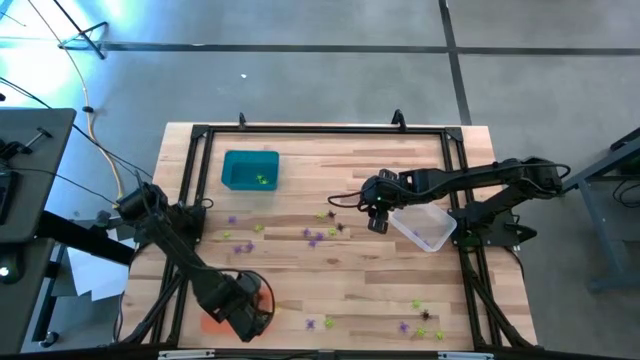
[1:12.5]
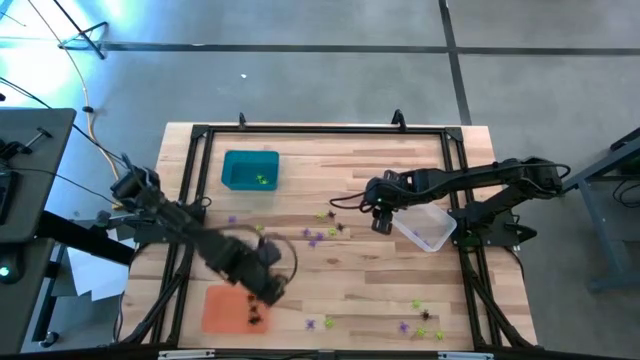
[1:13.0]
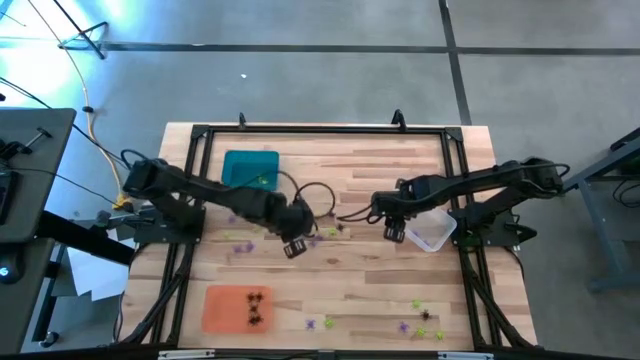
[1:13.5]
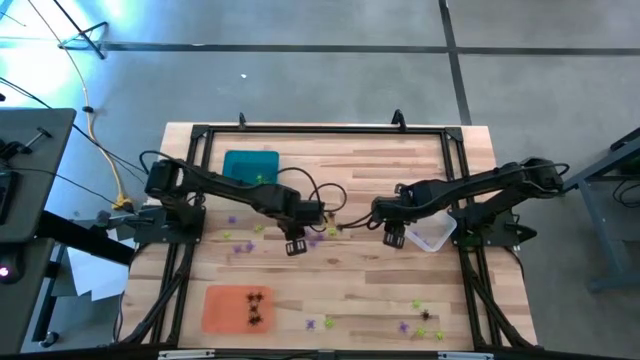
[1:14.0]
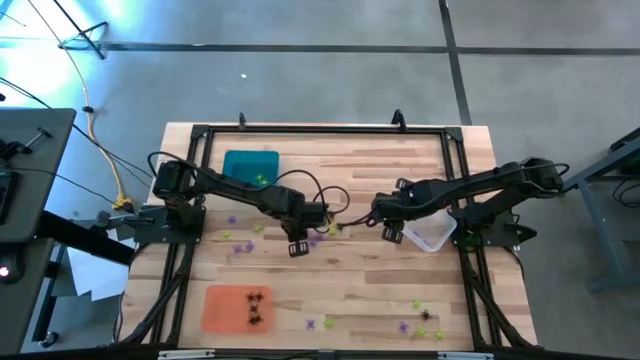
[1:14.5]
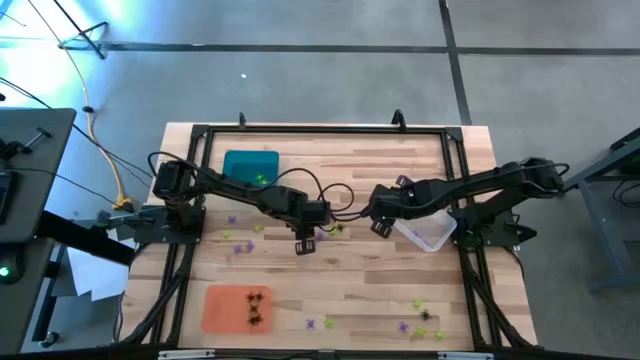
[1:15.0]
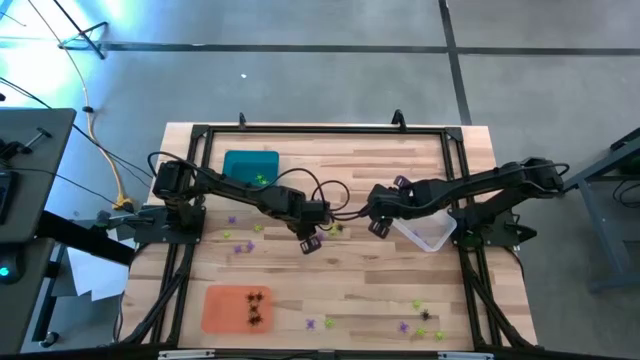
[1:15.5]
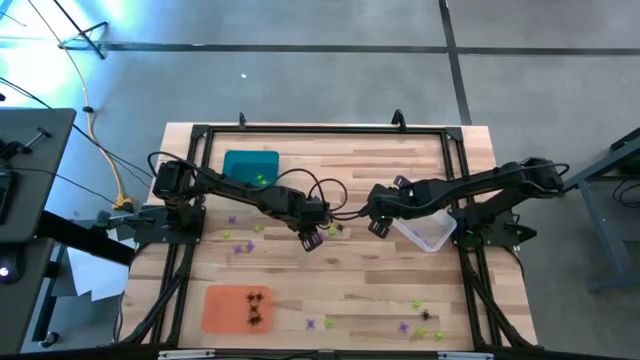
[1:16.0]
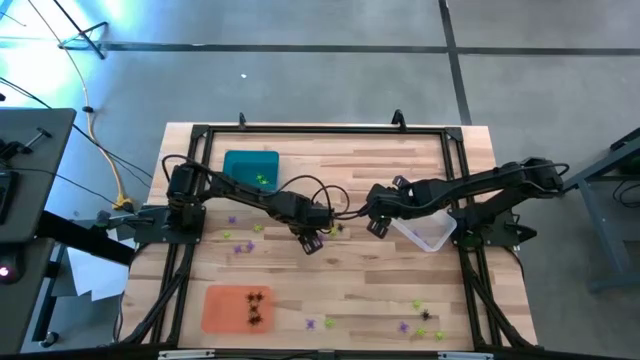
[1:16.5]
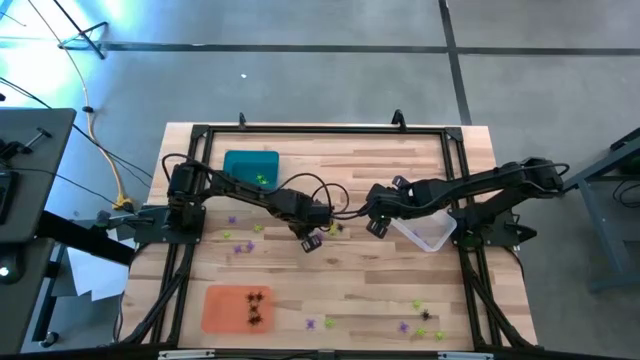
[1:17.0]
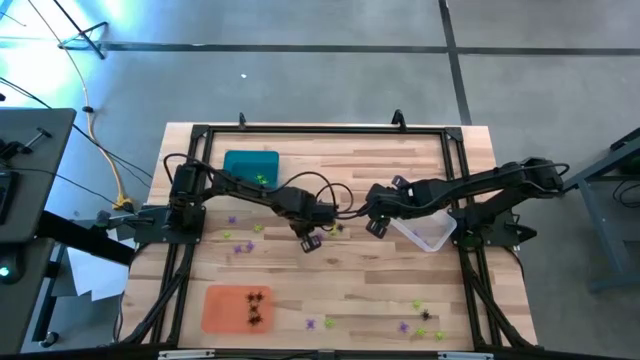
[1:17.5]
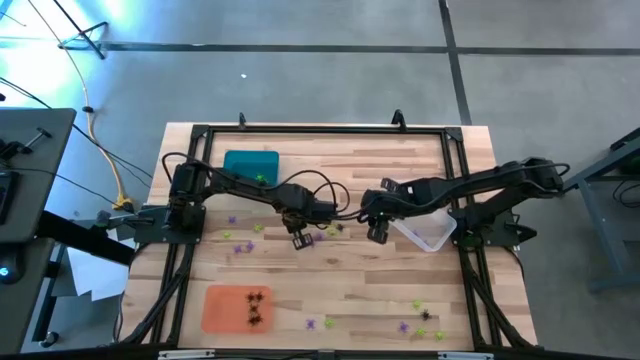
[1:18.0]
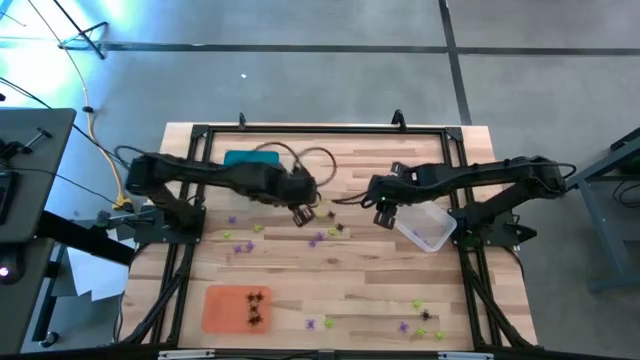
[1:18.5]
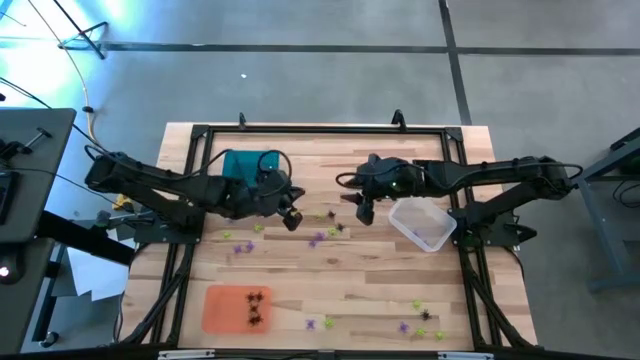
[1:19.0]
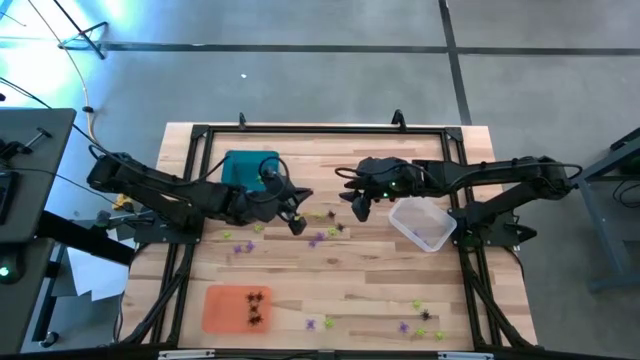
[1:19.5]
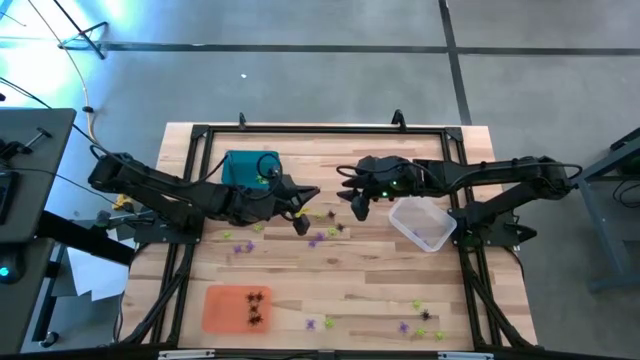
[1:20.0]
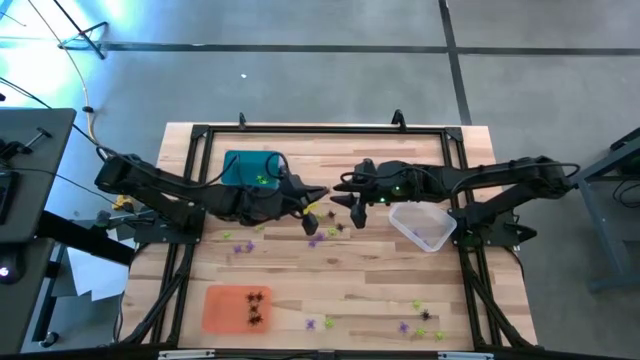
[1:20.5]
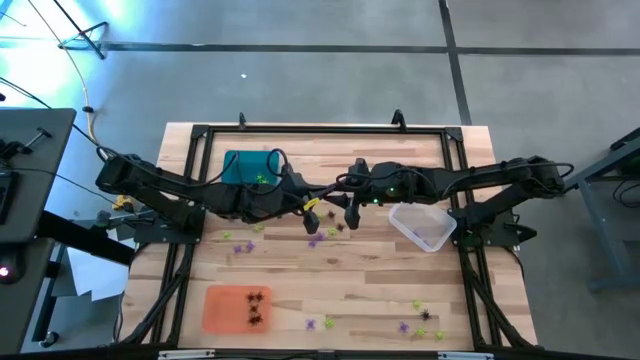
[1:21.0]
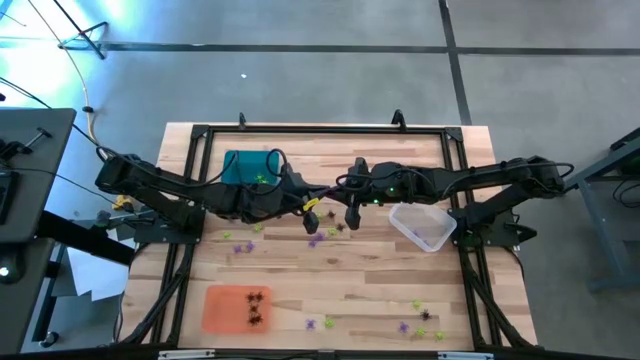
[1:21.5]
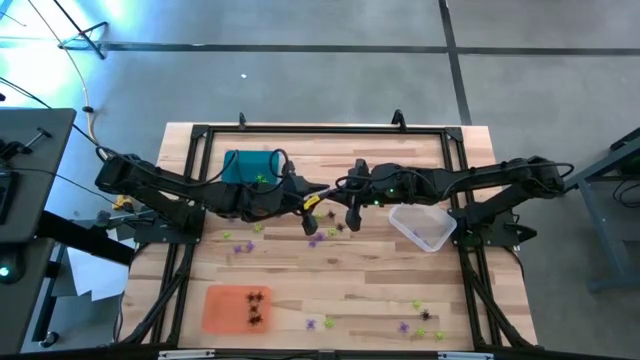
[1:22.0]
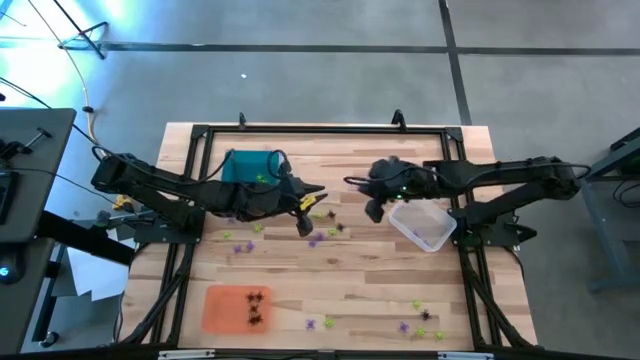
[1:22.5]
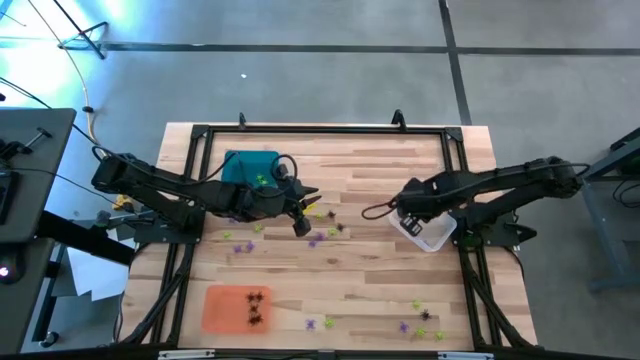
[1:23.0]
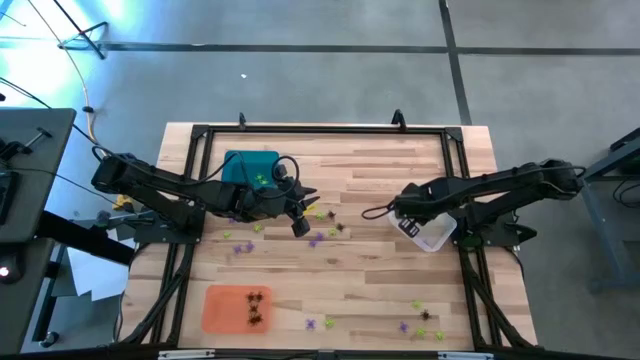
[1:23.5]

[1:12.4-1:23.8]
Task: Sort Halloween decoration
Put the violet spider toy into the transparent bin

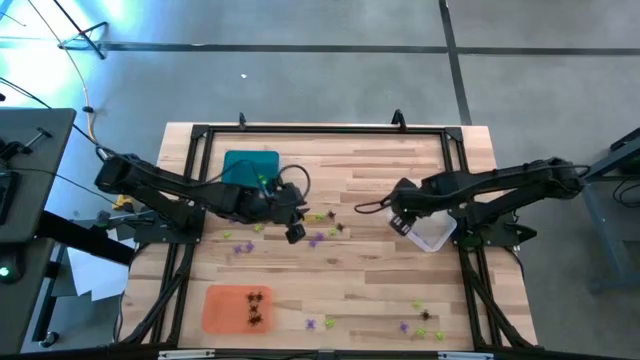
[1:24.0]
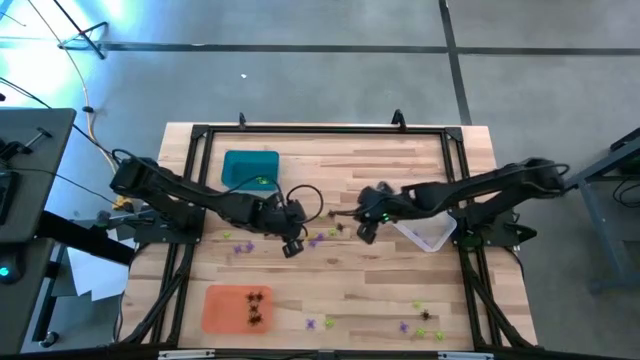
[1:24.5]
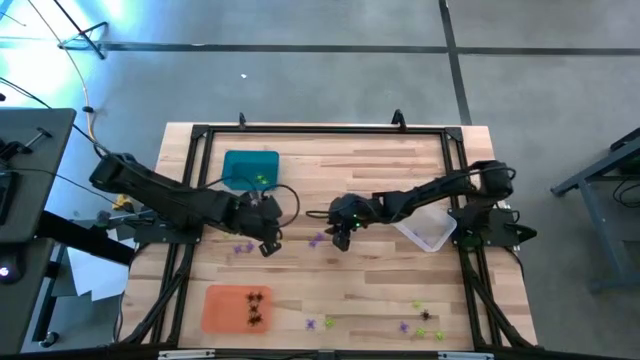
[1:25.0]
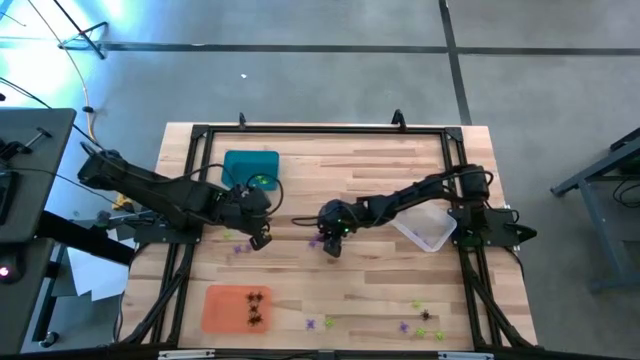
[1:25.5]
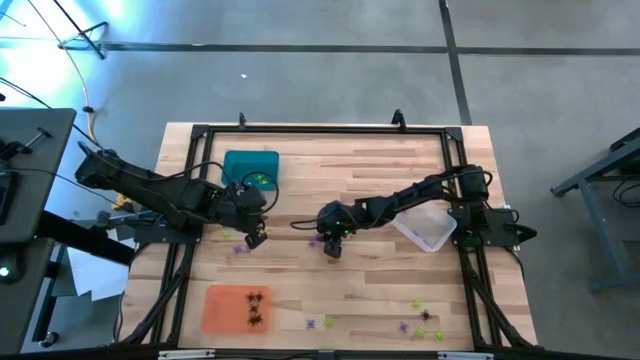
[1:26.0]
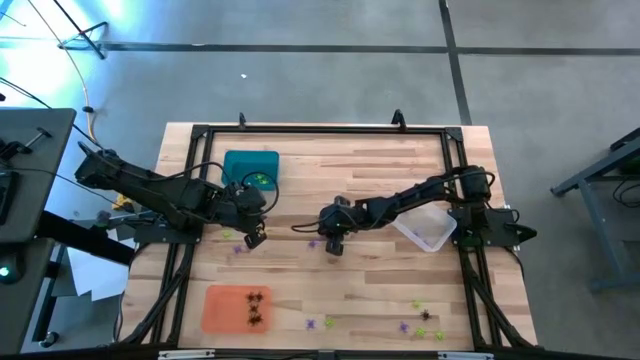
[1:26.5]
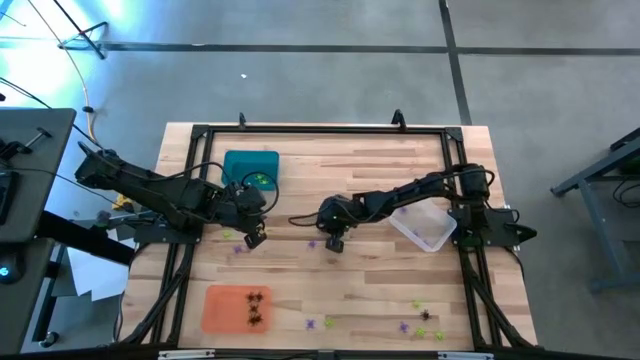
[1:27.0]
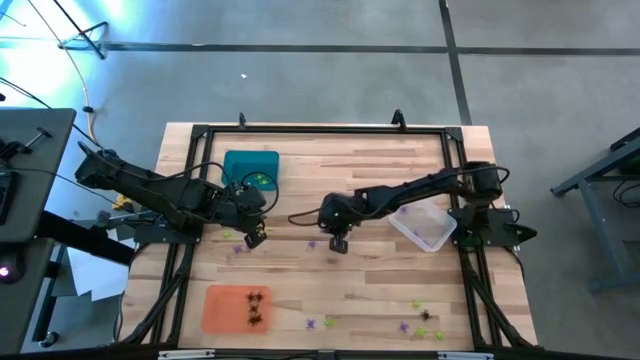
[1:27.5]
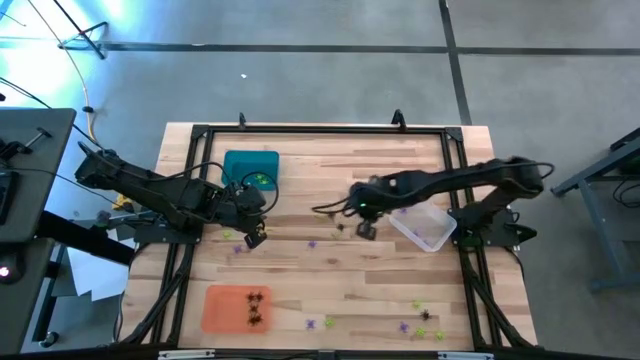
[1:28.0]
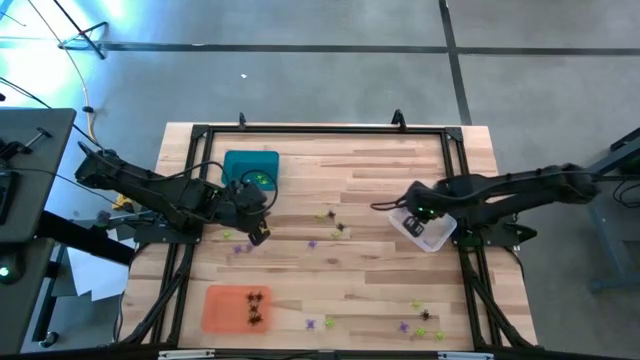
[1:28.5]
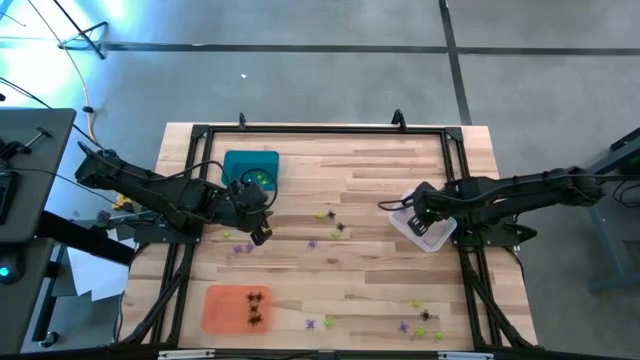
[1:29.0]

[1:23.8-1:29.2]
Put the violet spider toy into the transparent bin

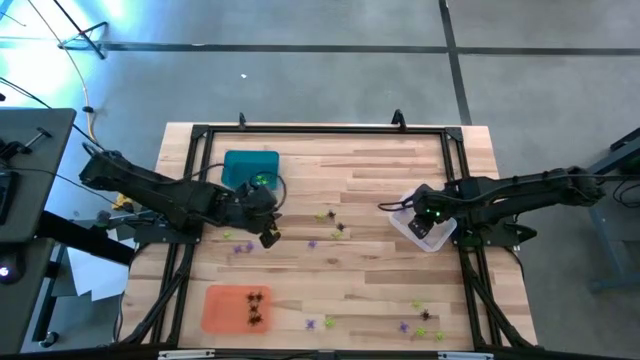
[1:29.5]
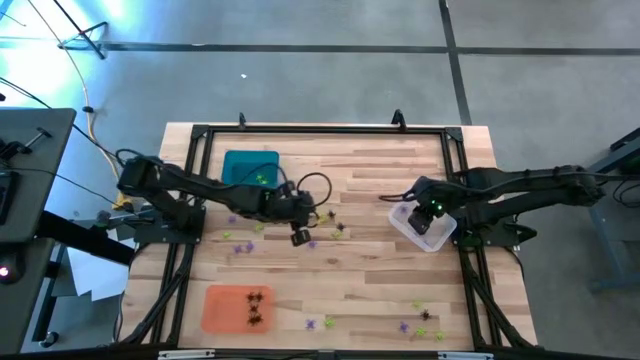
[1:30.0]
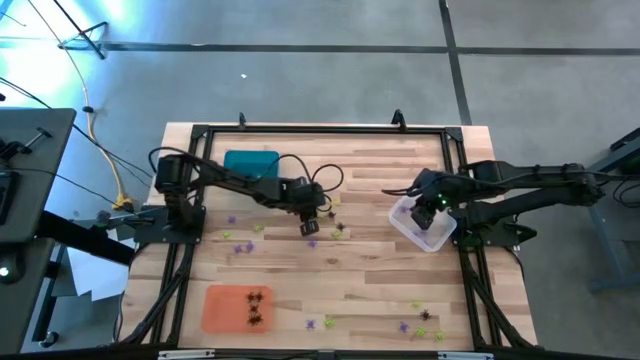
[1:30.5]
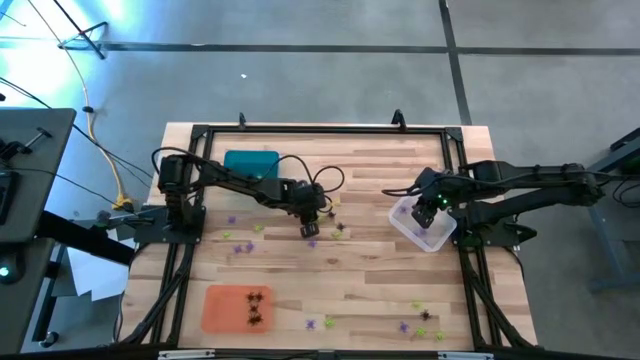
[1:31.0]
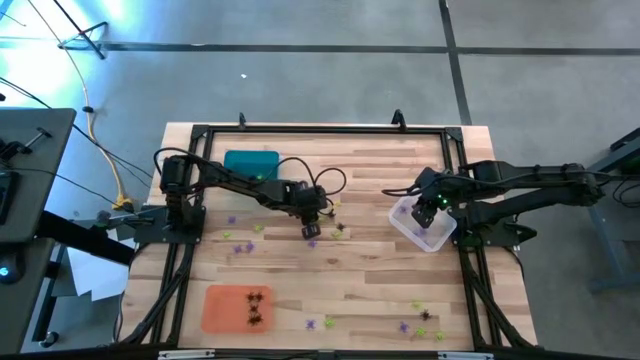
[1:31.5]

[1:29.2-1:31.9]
Put the green spider toy into the blue bin

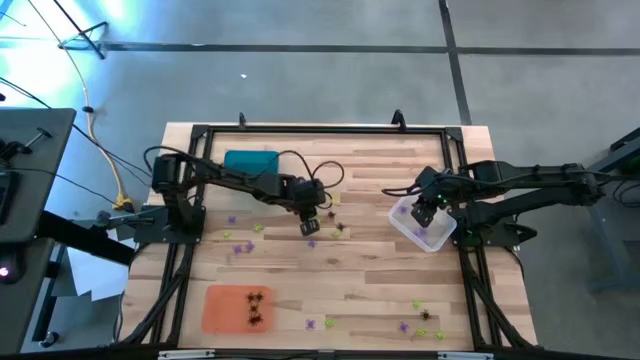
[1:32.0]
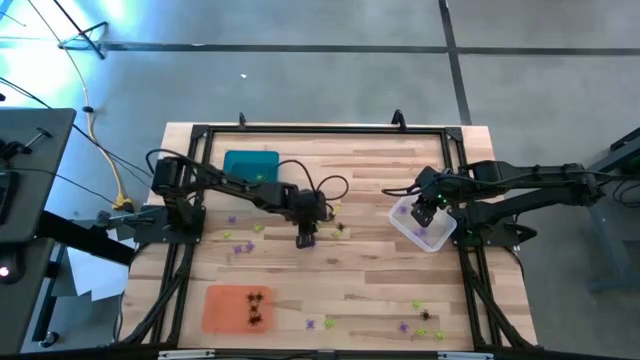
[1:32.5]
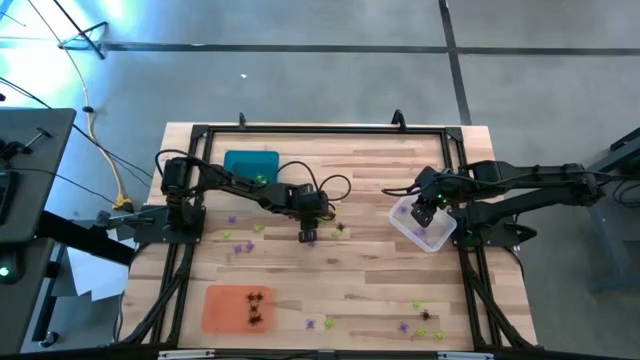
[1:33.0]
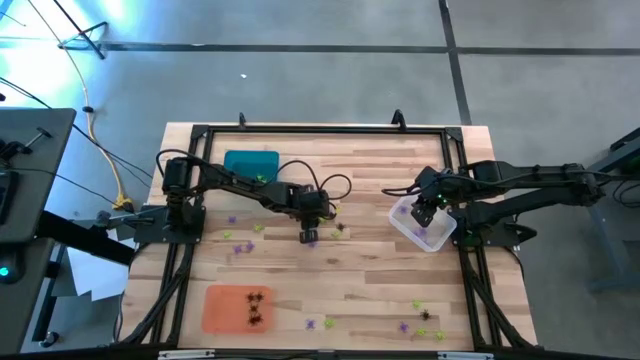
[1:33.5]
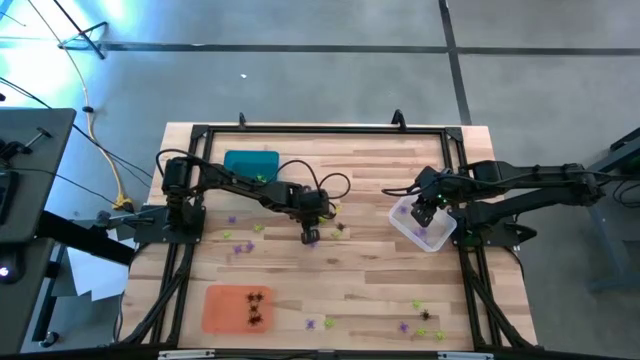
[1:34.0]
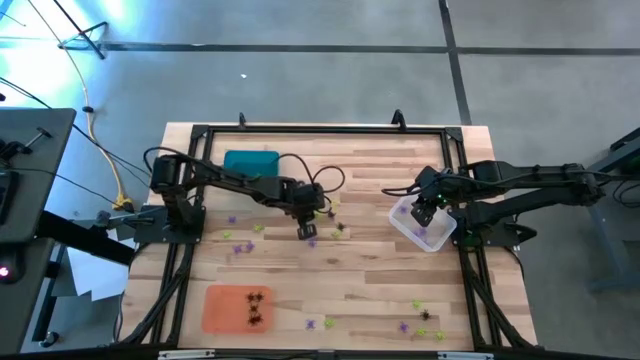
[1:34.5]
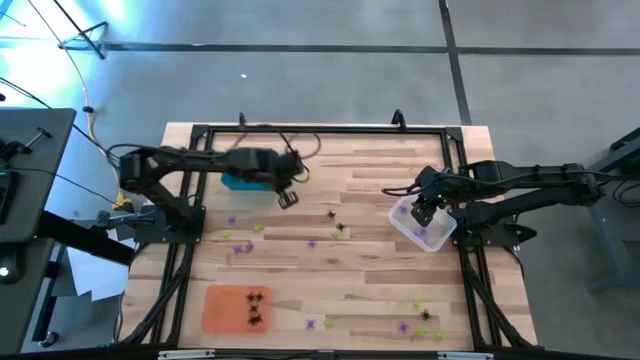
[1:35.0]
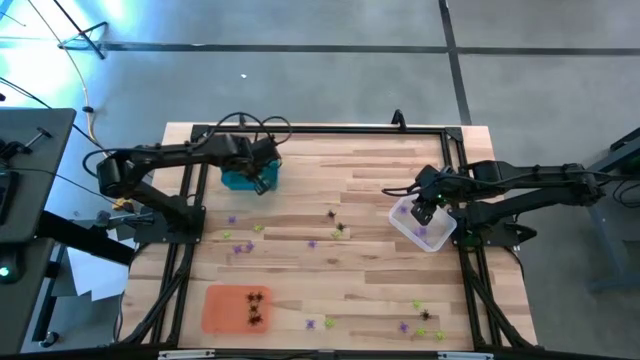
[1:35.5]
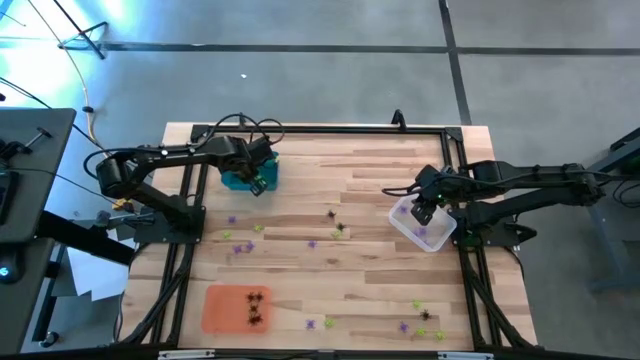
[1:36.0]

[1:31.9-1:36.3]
Put the green spider toy into the blue bin
